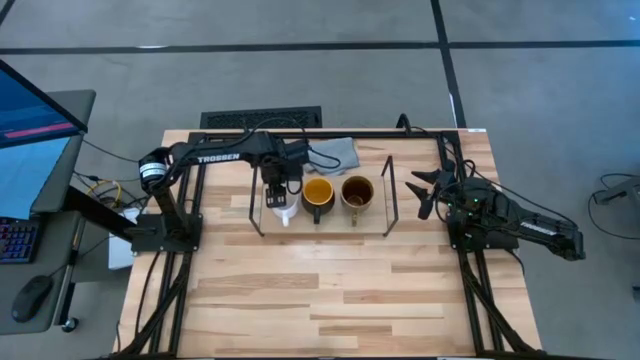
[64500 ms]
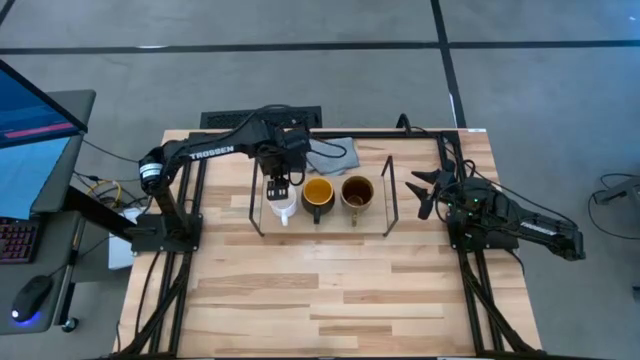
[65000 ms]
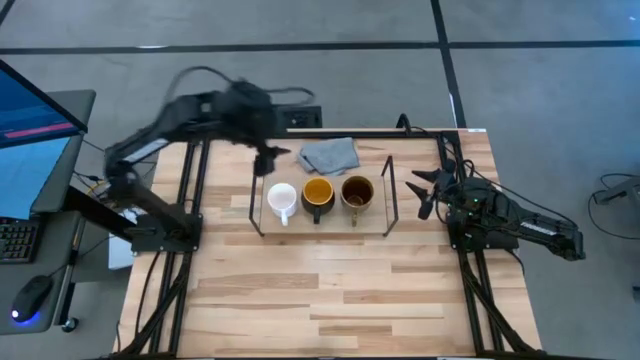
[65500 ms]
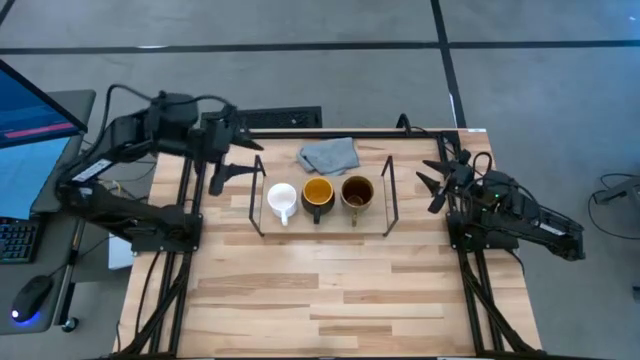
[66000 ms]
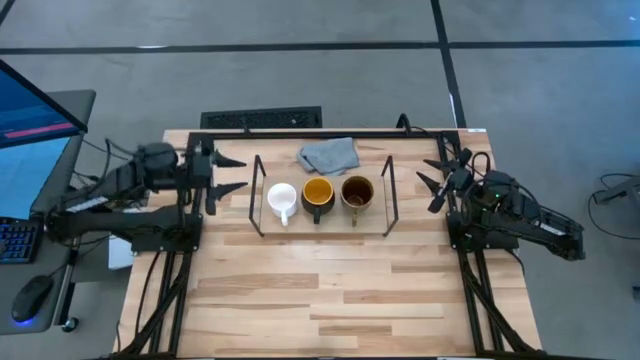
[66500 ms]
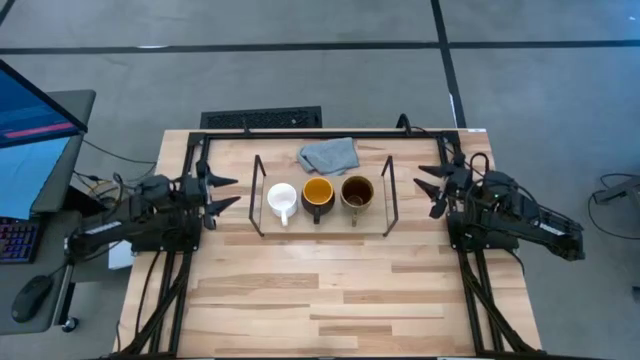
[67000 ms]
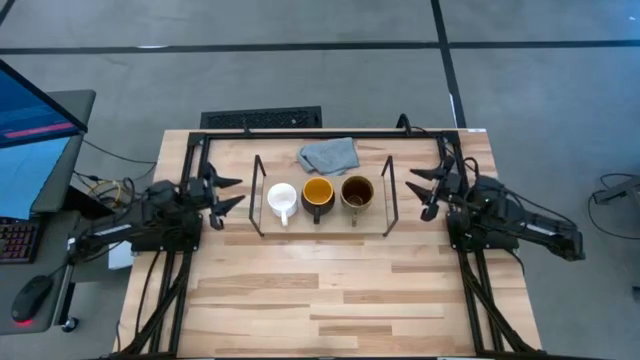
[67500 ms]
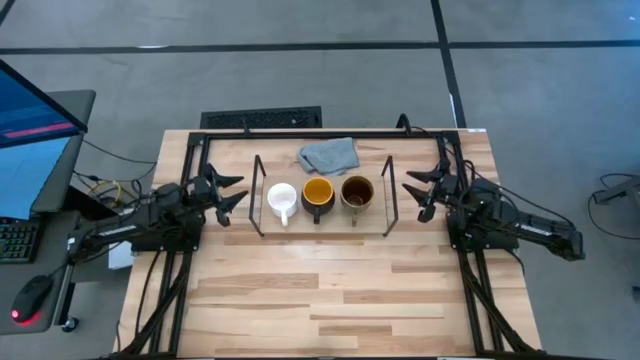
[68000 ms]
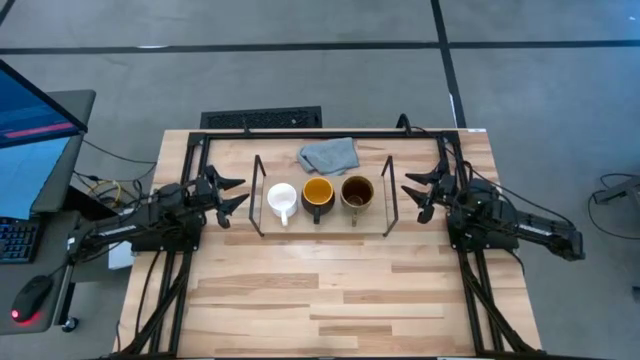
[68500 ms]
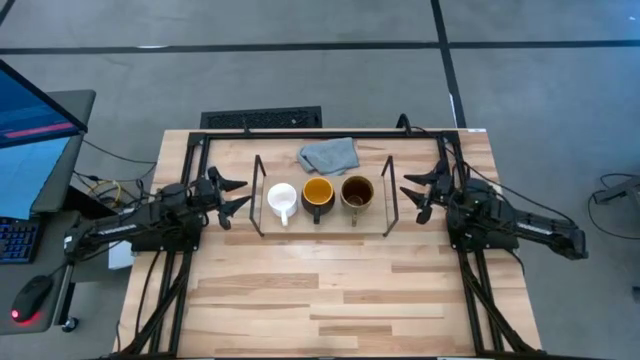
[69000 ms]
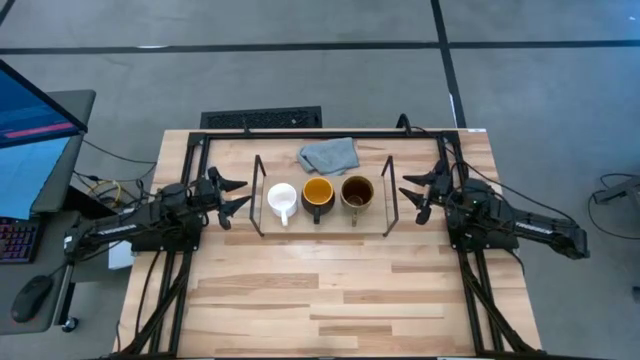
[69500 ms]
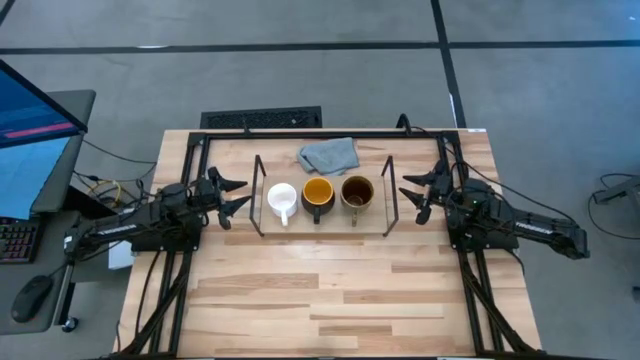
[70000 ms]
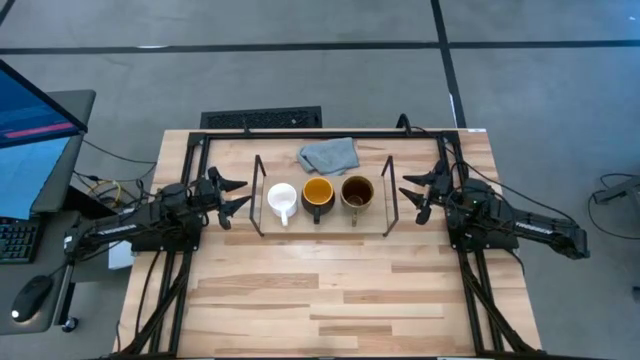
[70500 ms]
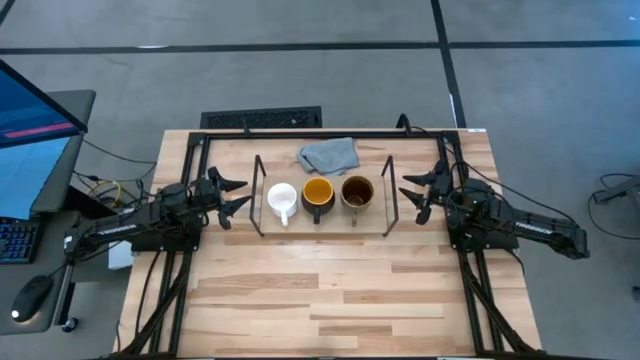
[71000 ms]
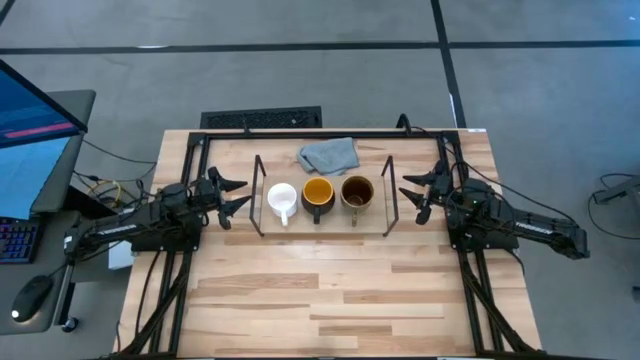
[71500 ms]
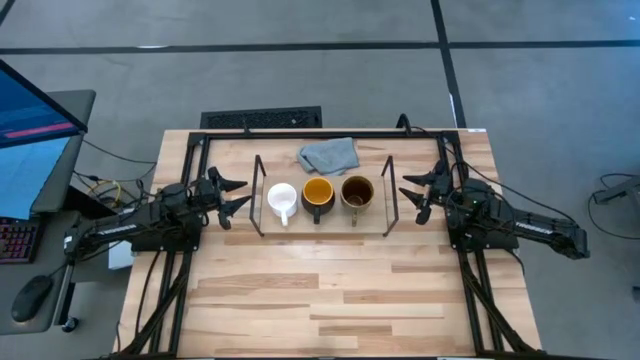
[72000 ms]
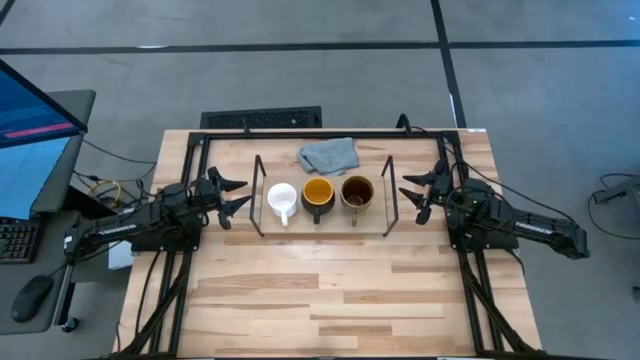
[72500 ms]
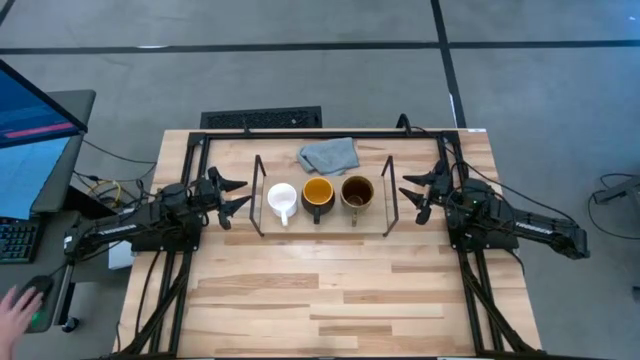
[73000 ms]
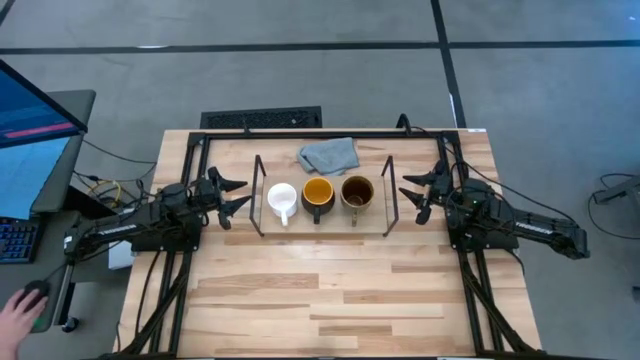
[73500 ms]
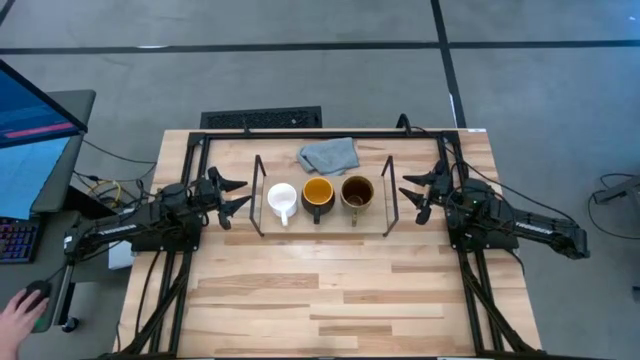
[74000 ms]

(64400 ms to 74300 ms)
Task: Stack small to large cups/mugs on shelf
Return to Home Position
